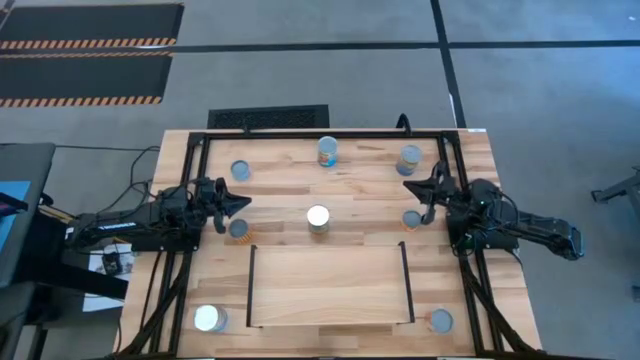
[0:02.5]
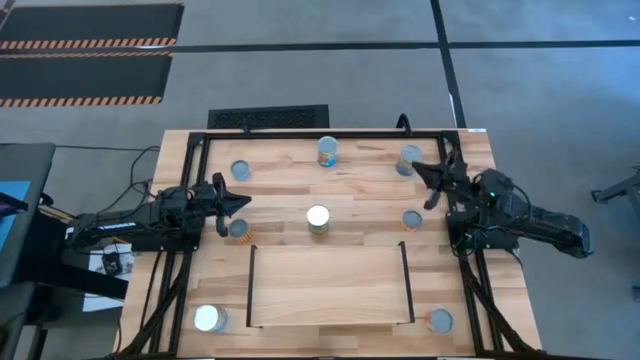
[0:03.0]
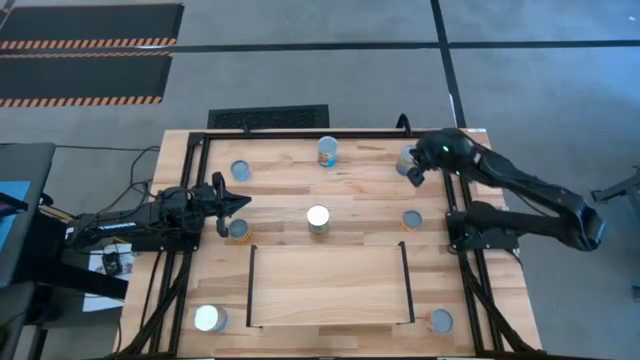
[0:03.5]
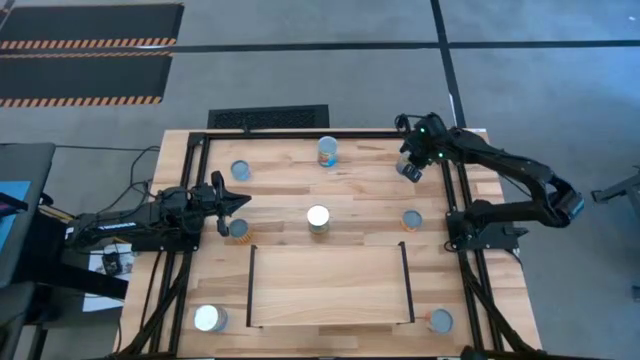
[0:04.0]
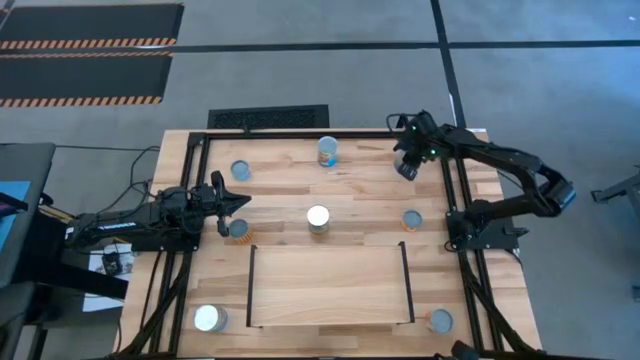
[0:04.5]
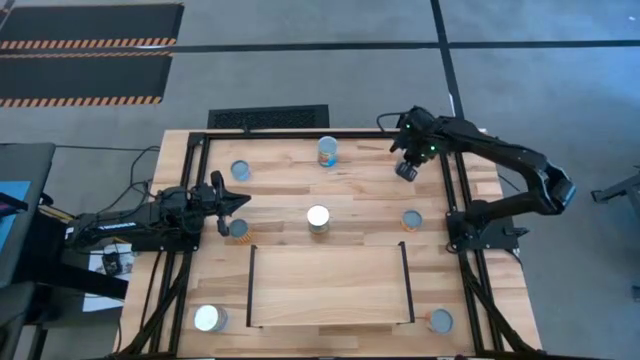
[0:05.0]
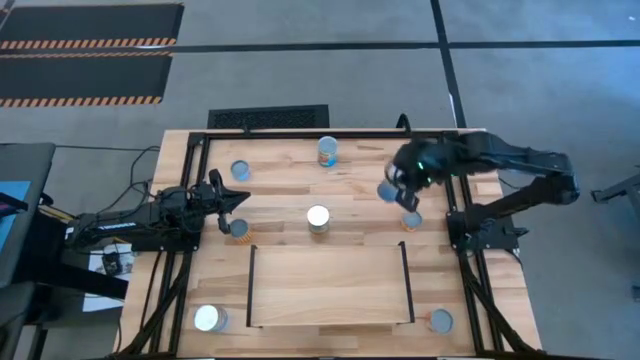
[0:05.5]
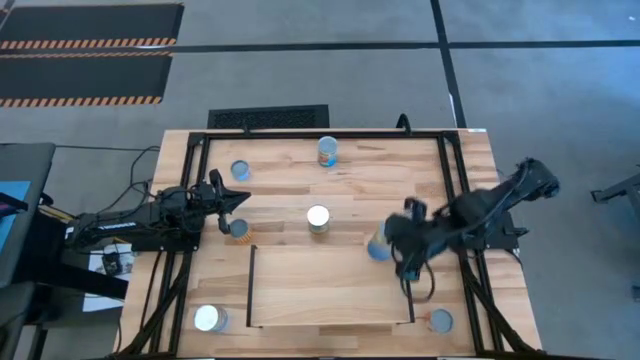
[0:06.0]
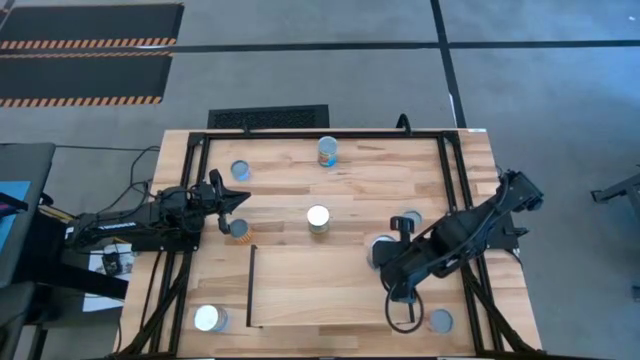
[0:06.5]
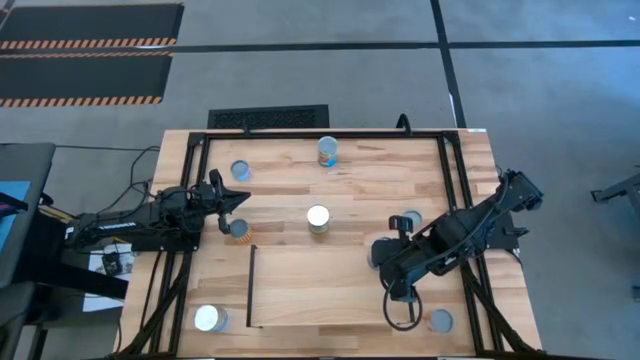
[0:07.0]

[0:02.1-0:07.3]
Task: Pick and place cans onto a shelf
Put the canned peas on the shelf

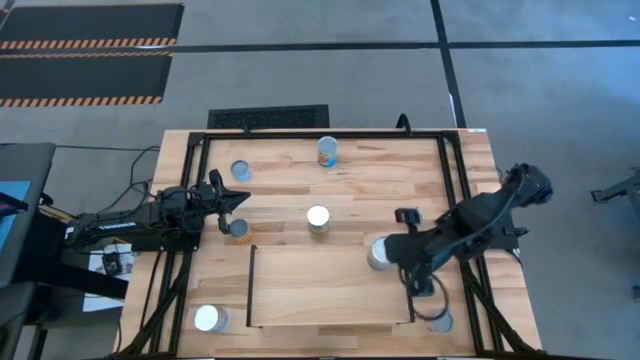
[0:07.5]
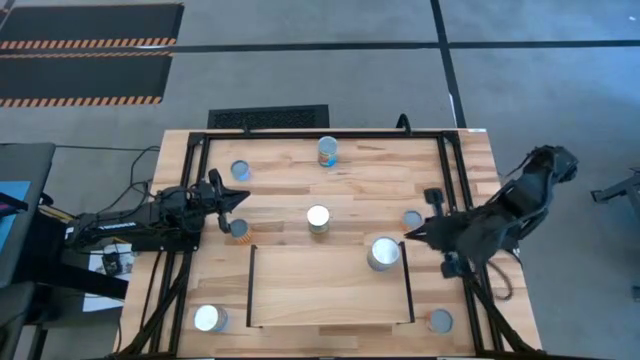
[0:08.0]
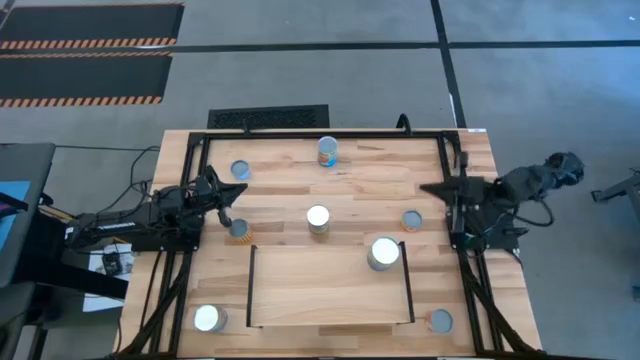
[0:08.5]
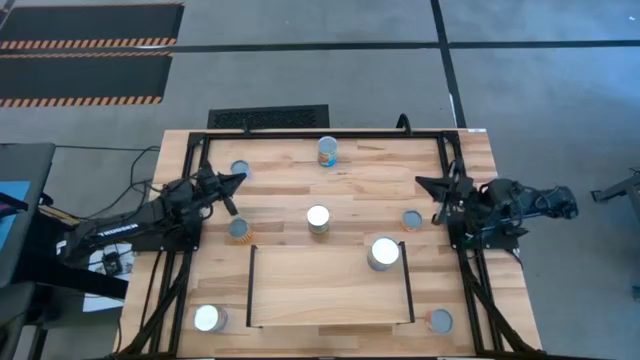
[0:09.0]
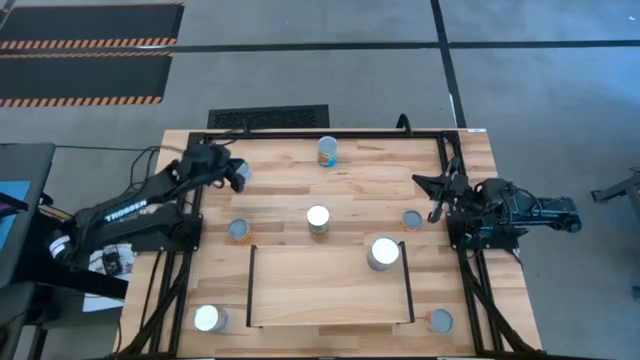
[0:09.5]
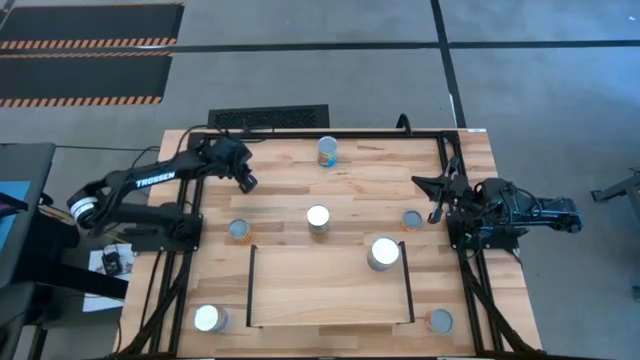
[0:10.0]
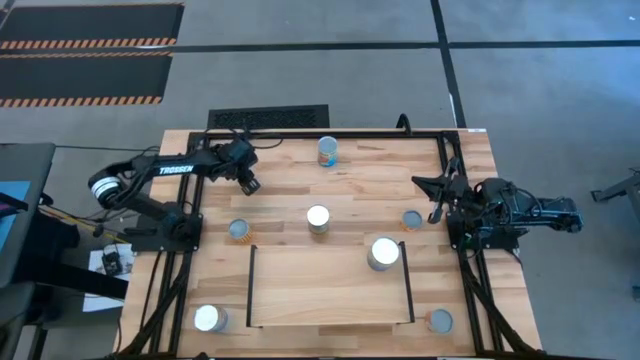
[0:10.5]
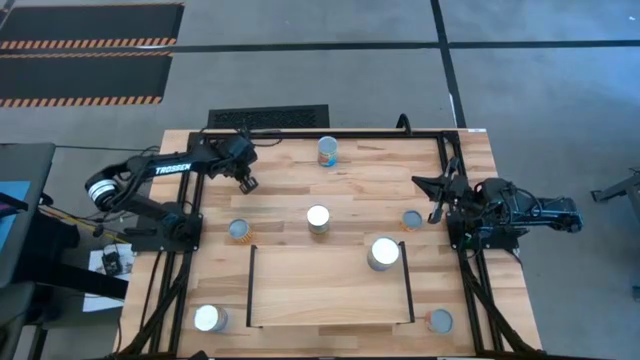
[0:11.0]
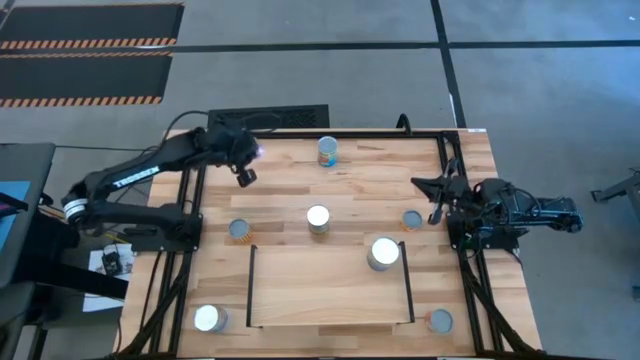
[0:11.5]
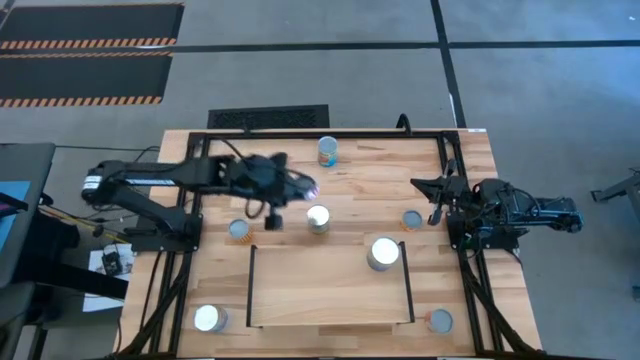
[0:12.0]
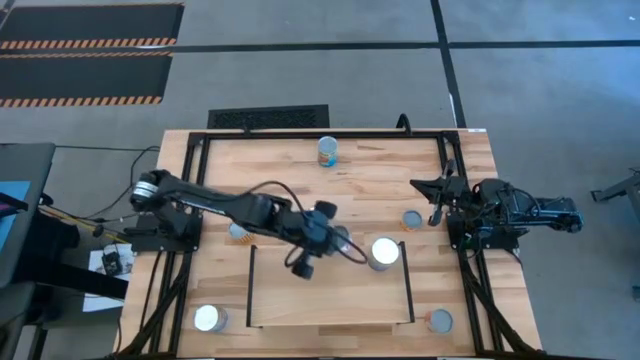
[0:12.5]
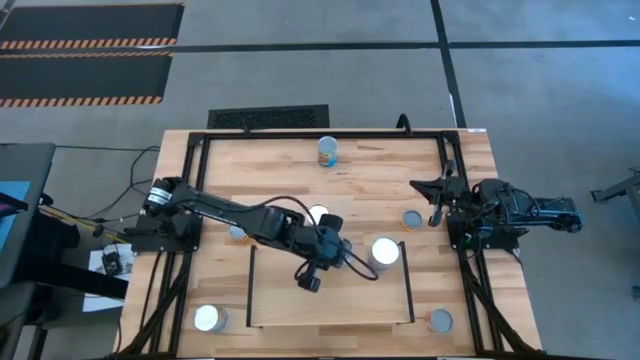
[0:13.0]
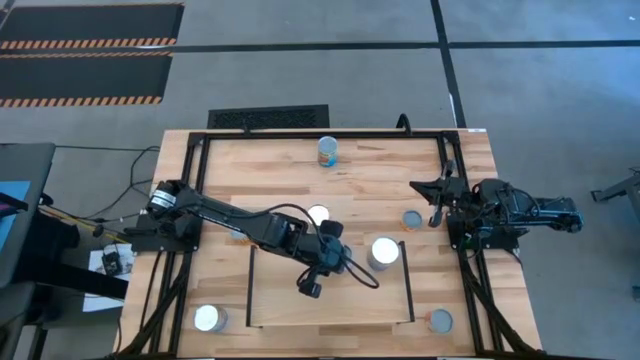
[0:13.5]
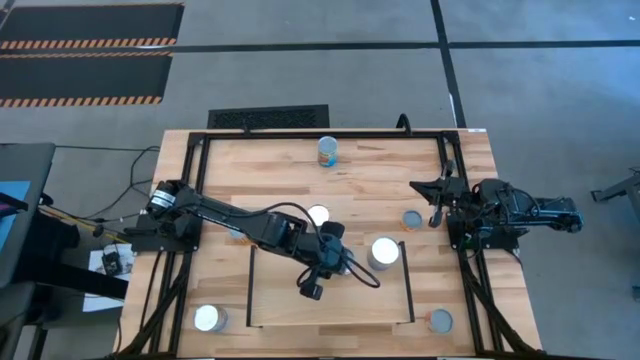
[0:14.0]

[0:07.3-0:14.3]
Put the canned salmon on the shelf

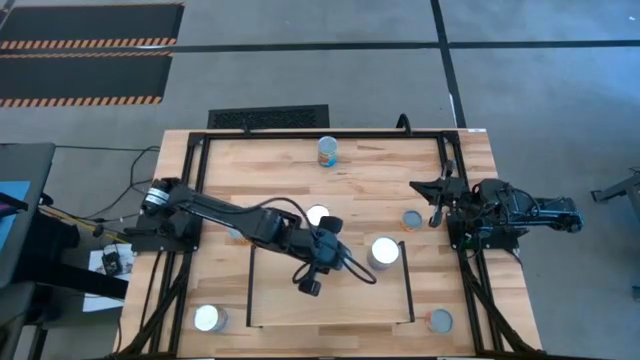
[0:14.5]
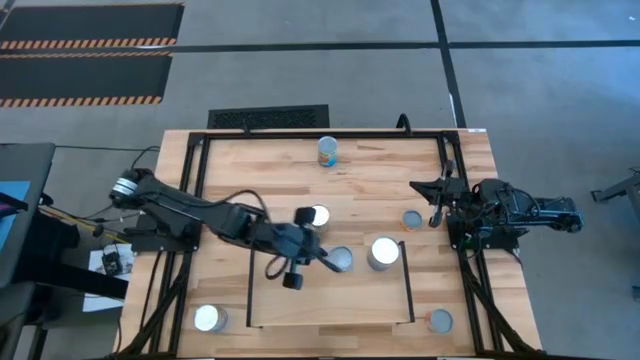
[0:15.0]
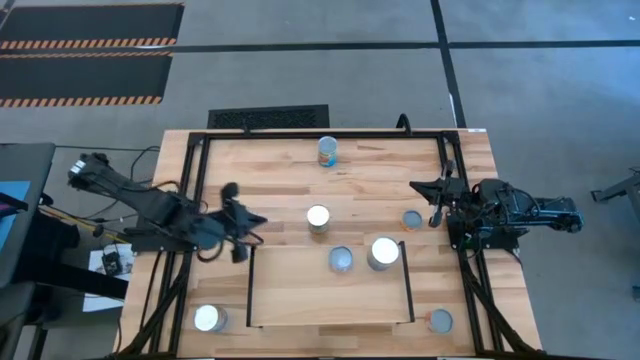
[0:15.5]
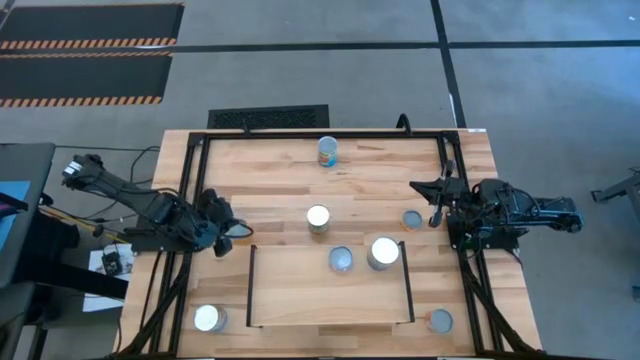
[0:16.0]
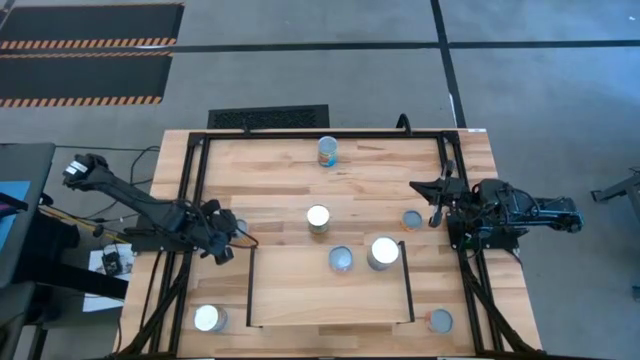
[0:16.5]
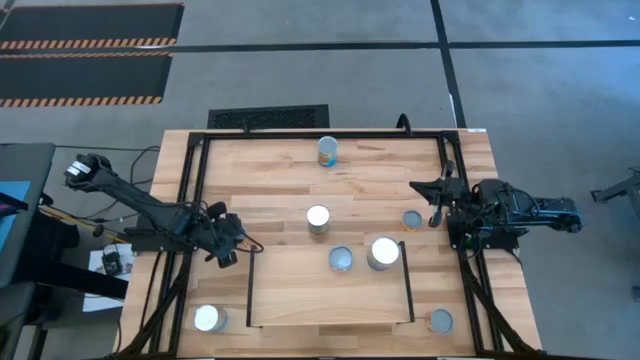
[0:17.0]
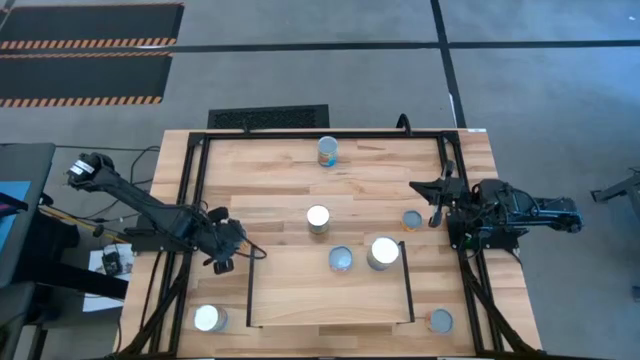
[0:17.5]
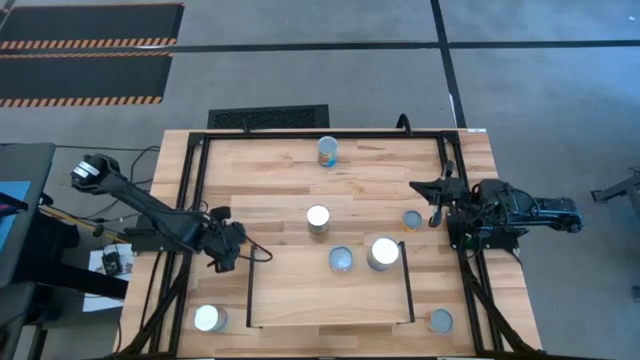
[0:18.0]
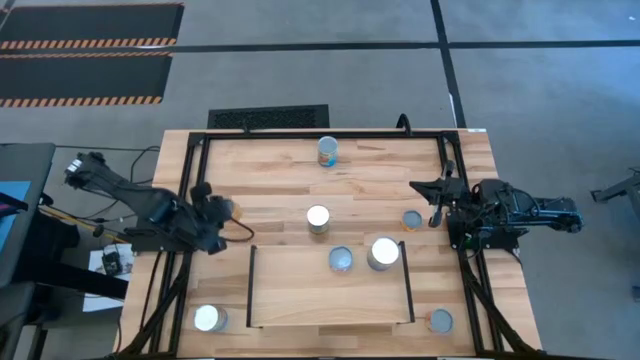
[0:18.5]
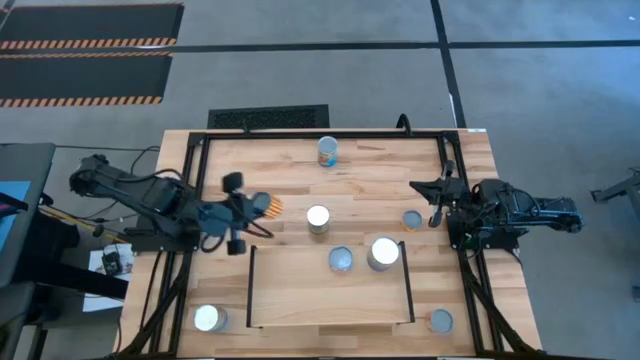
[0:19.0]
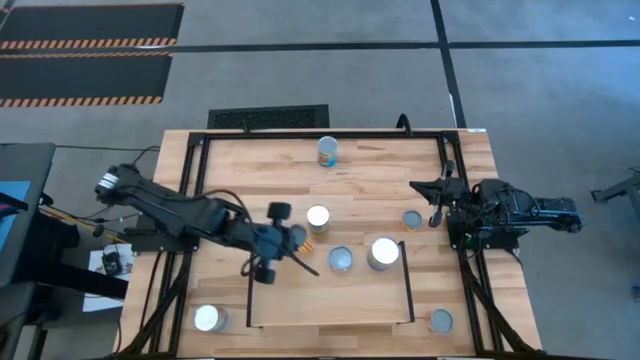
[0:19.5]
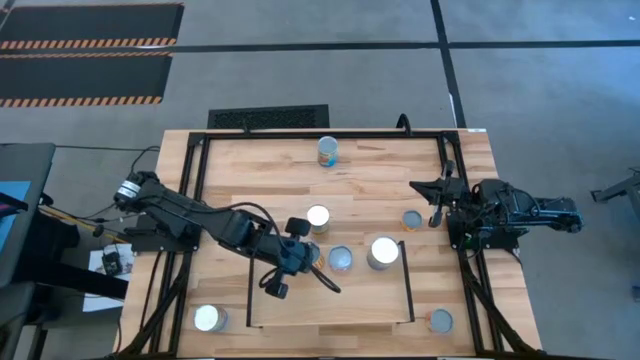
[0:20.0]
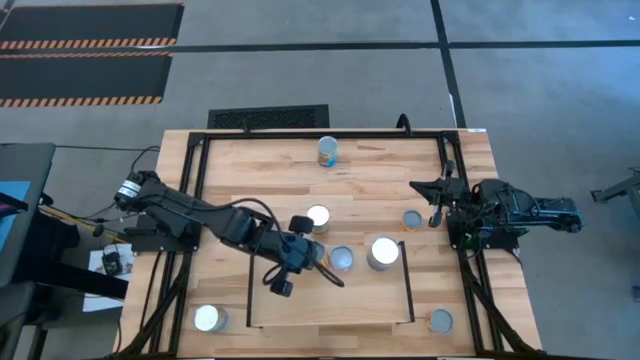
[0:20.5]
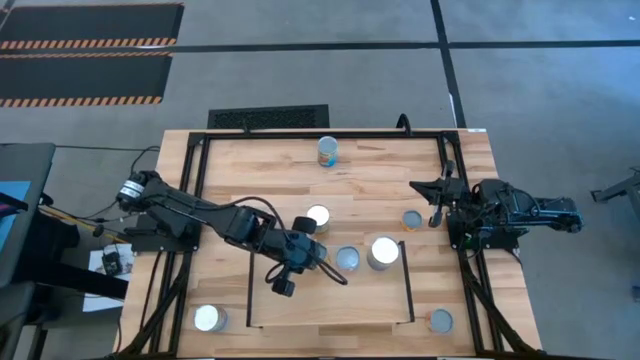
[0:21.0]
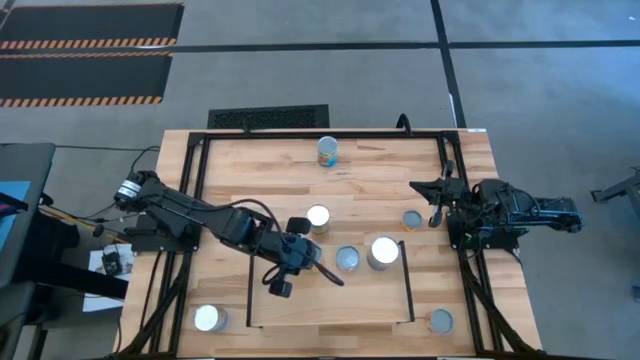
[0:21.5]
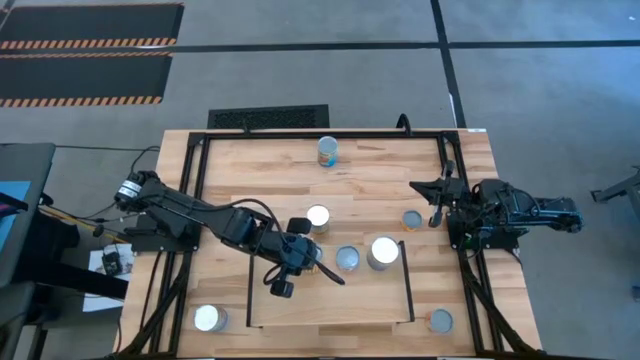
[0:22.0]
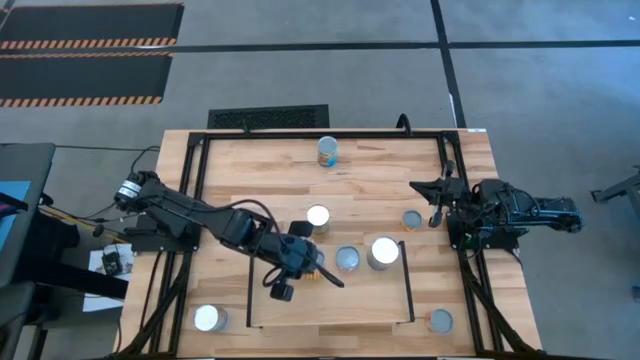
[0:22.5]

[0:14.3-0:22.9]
Put the canned black beans on the shelf

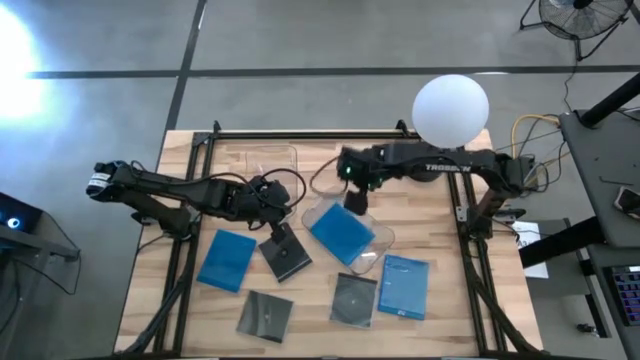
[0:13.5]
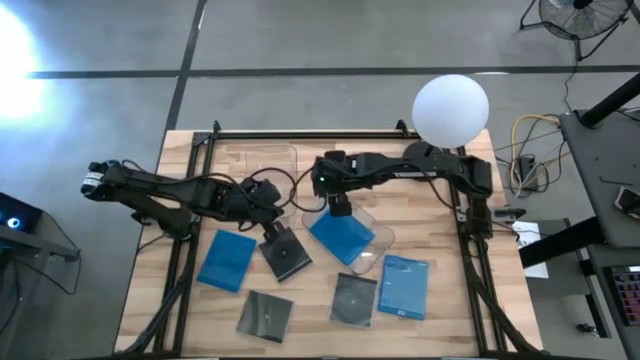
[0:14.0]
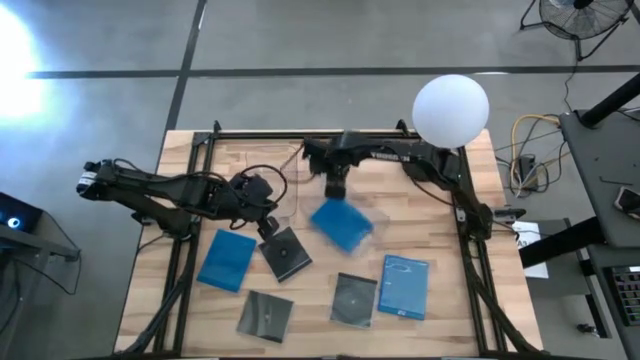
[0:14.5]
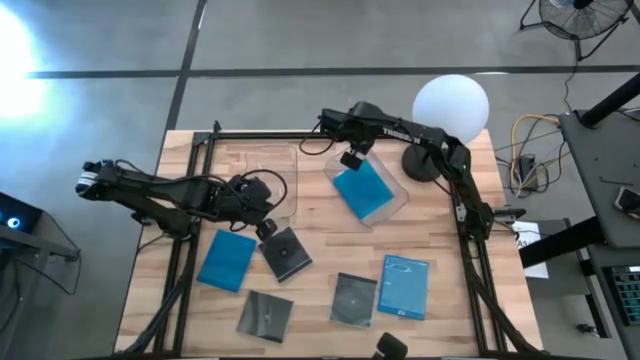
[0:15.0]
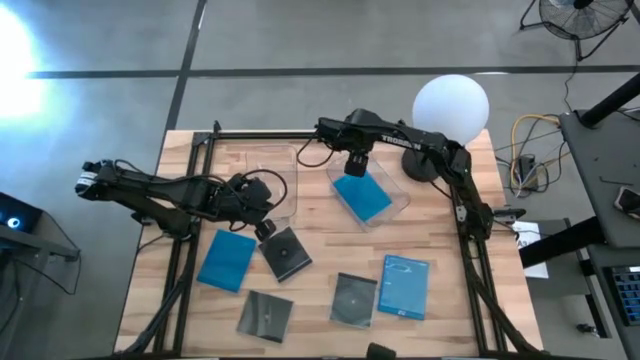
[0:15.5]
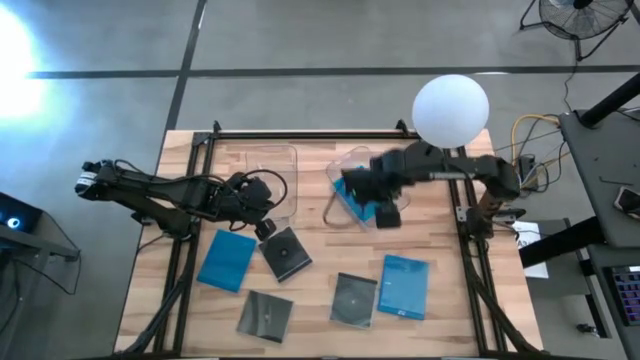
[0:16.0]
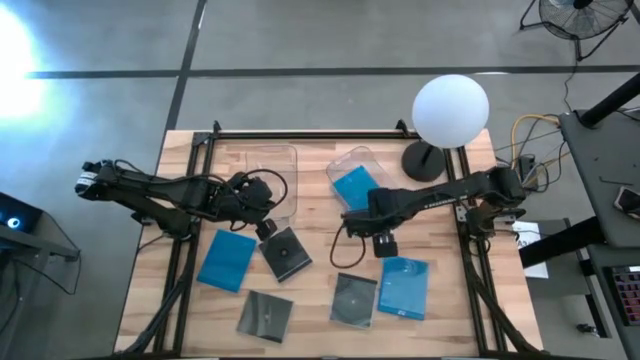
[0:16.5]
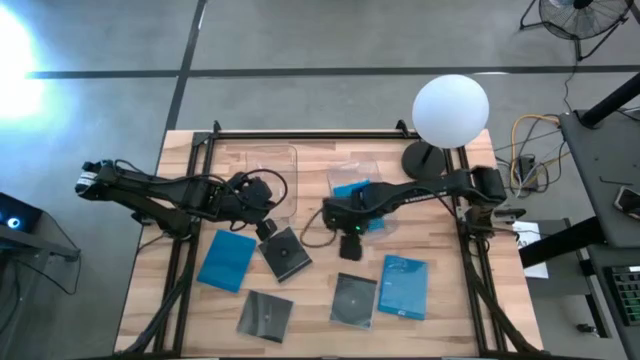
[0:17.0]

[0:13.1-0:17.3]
Task: Pick & place jewel cases by type
Adjust the right transparent bin on the table
